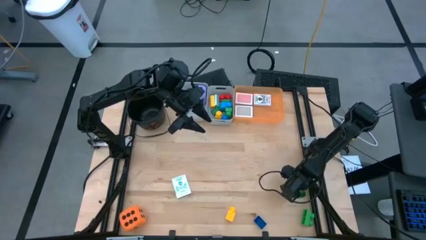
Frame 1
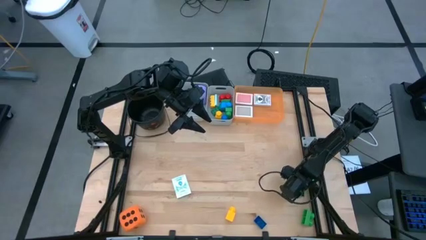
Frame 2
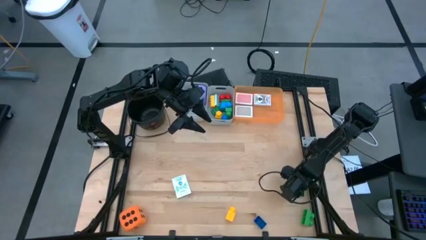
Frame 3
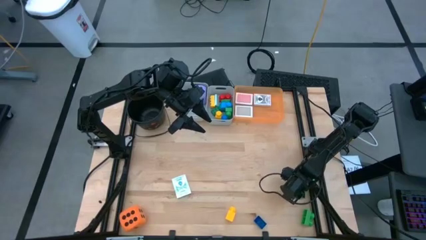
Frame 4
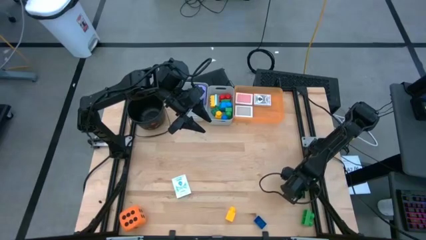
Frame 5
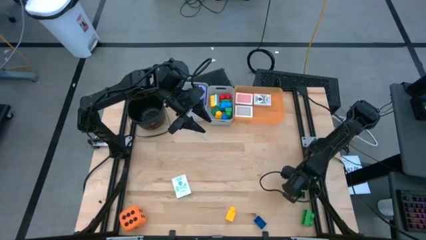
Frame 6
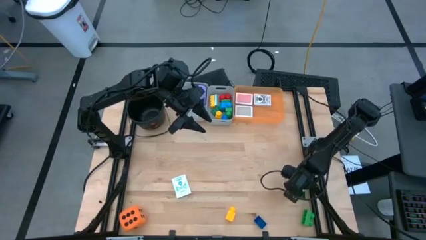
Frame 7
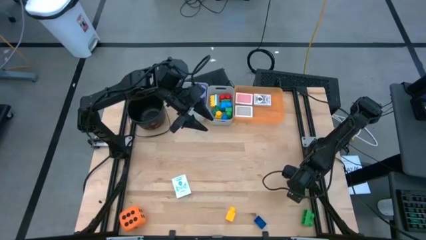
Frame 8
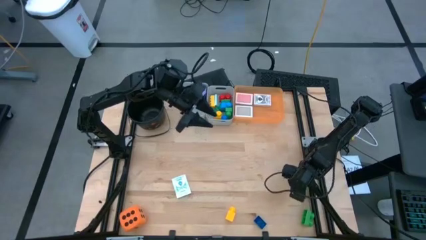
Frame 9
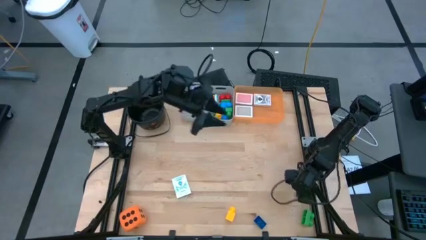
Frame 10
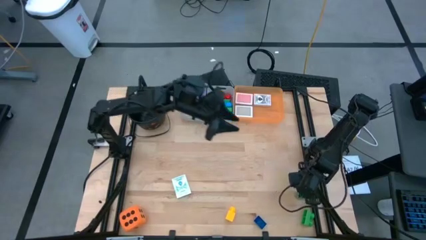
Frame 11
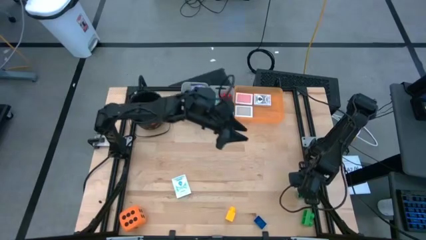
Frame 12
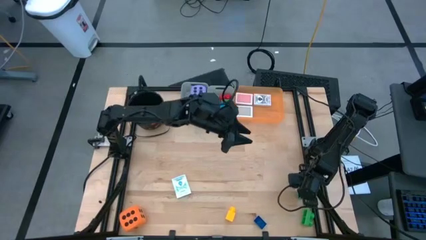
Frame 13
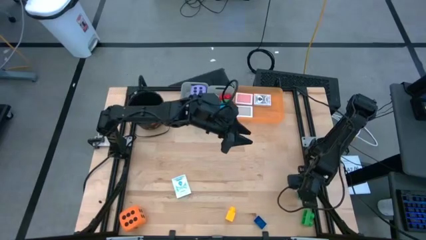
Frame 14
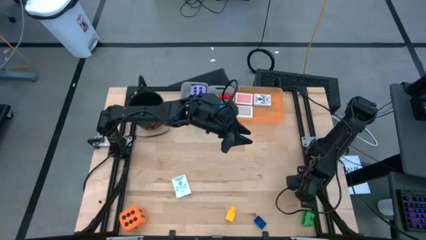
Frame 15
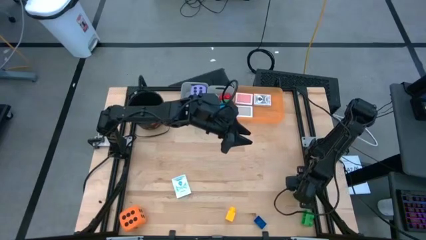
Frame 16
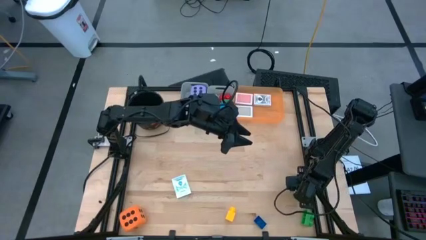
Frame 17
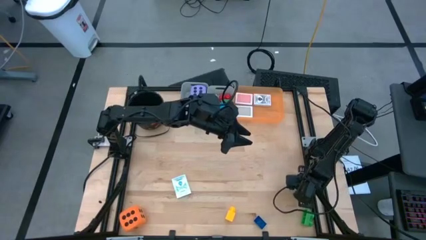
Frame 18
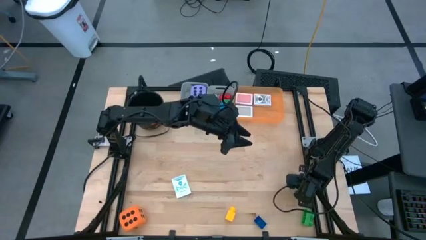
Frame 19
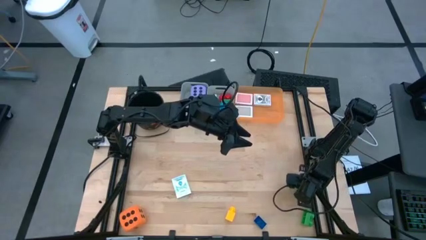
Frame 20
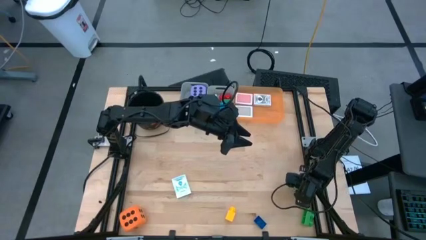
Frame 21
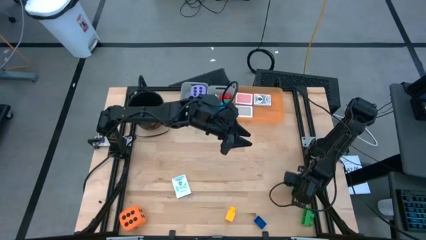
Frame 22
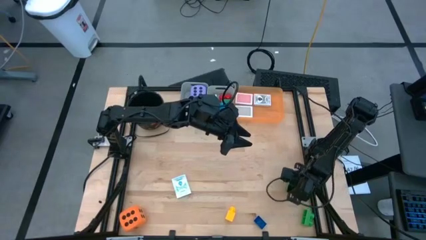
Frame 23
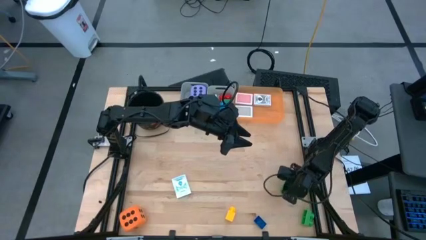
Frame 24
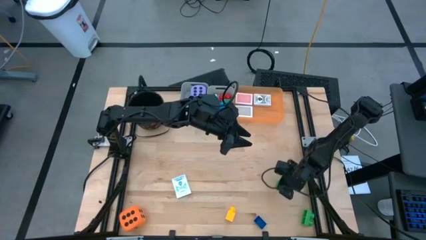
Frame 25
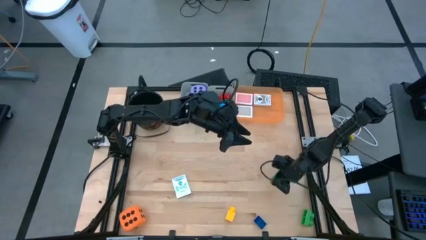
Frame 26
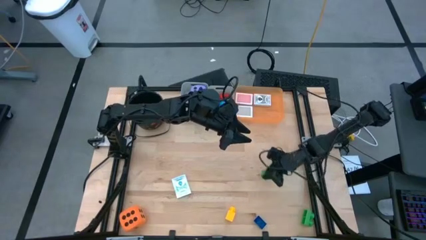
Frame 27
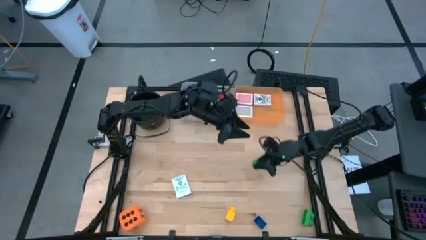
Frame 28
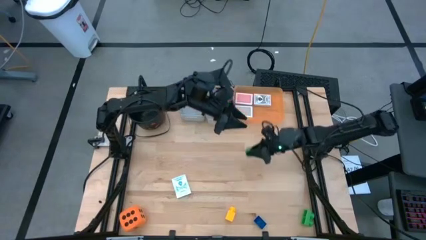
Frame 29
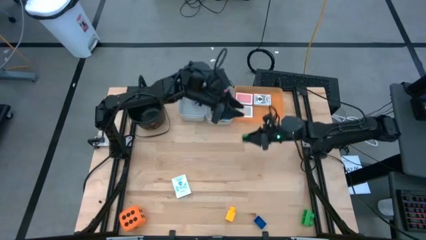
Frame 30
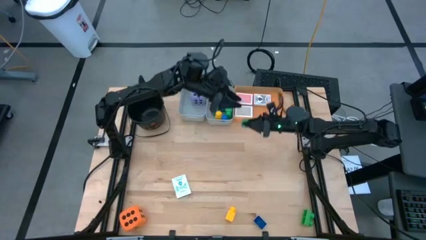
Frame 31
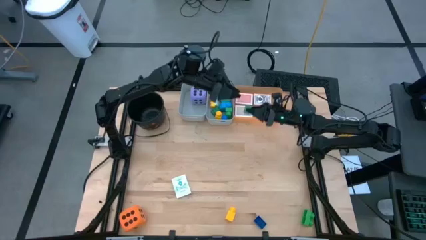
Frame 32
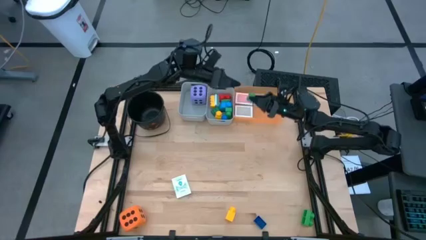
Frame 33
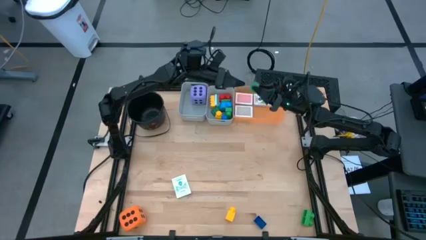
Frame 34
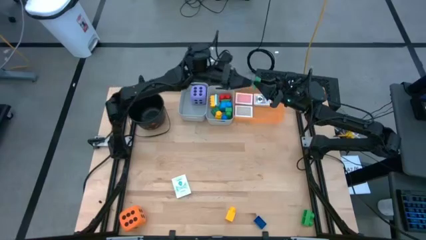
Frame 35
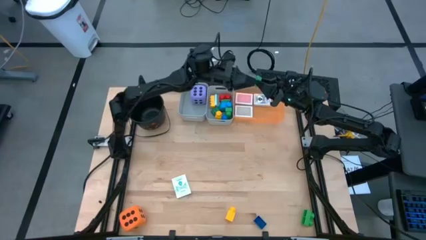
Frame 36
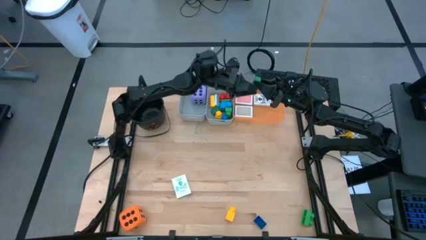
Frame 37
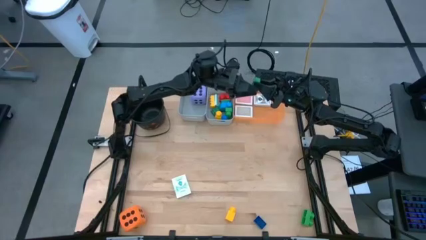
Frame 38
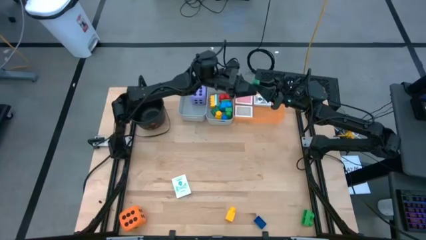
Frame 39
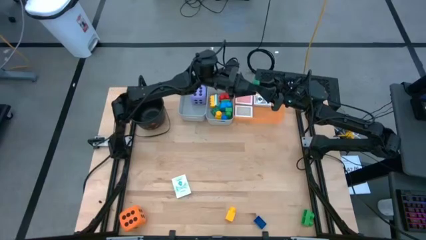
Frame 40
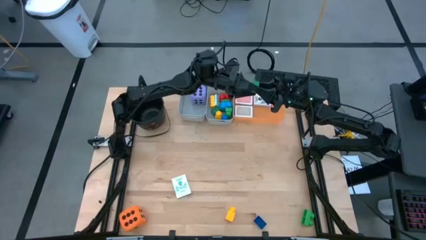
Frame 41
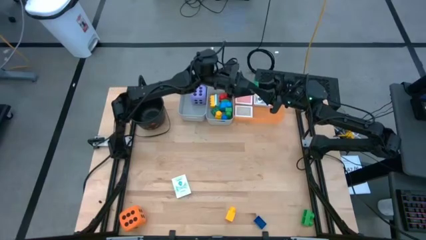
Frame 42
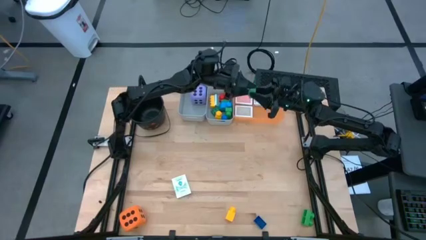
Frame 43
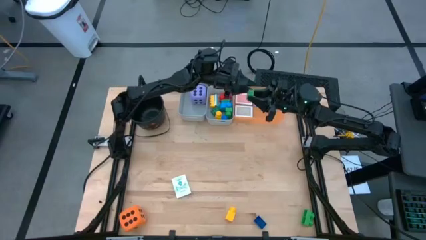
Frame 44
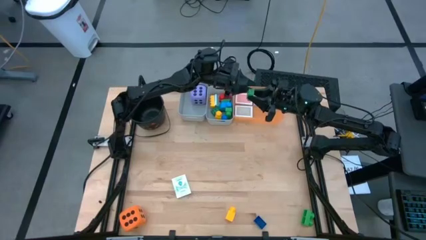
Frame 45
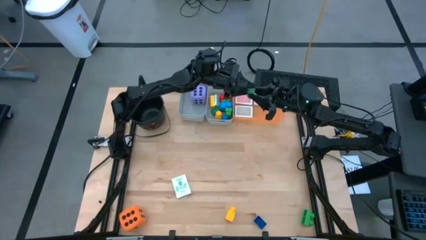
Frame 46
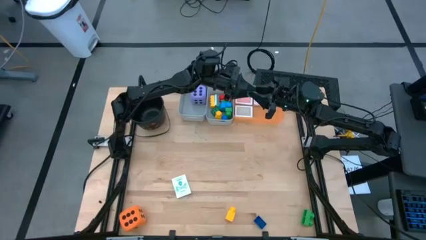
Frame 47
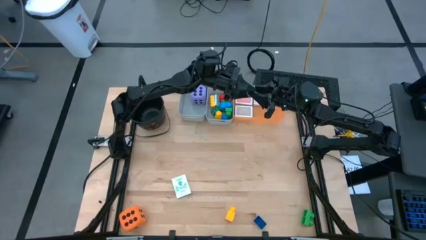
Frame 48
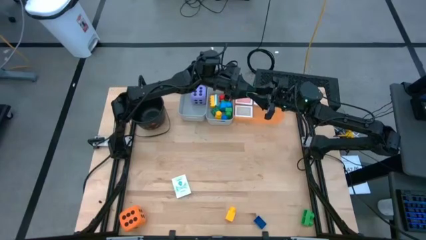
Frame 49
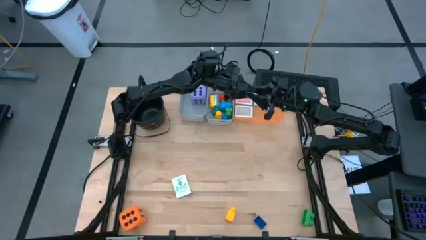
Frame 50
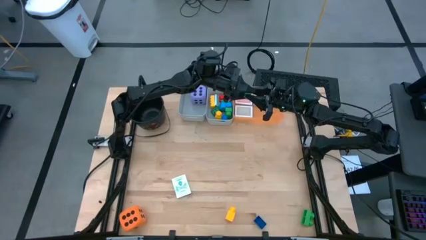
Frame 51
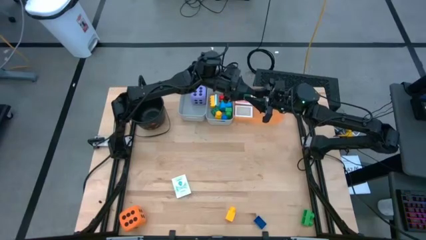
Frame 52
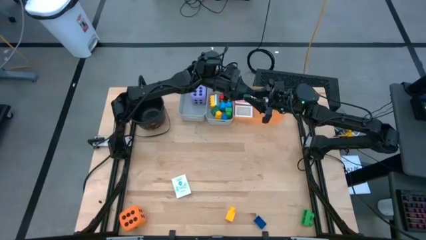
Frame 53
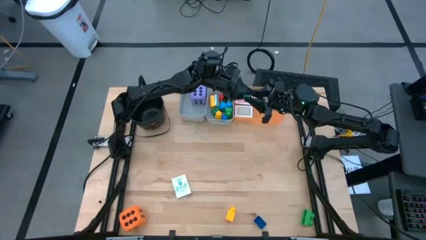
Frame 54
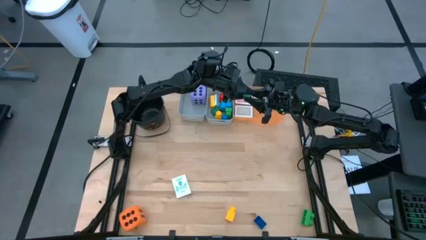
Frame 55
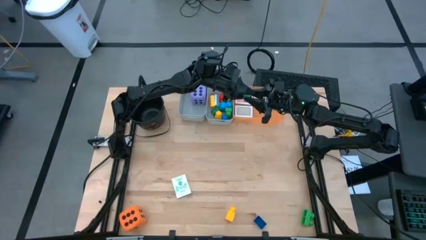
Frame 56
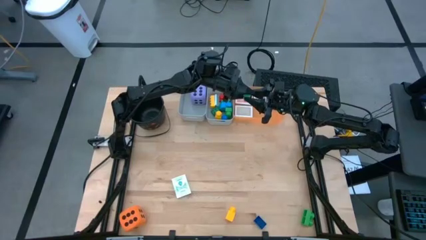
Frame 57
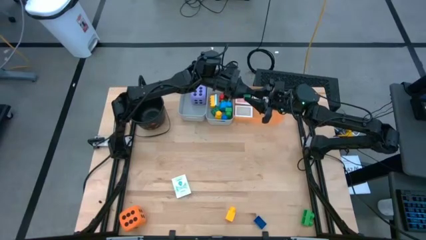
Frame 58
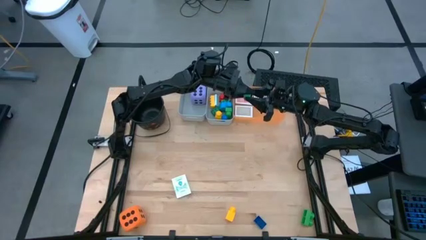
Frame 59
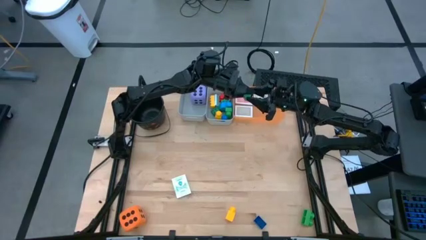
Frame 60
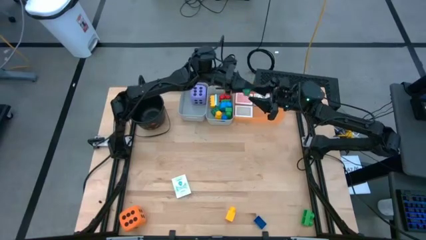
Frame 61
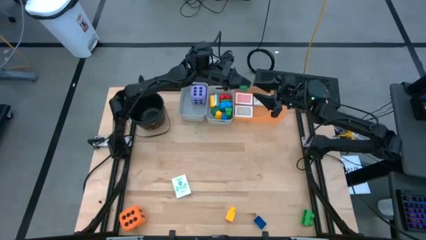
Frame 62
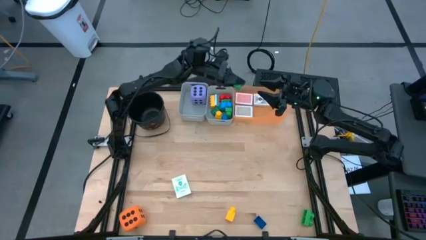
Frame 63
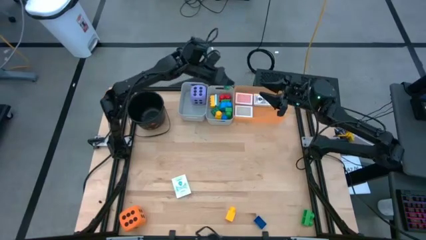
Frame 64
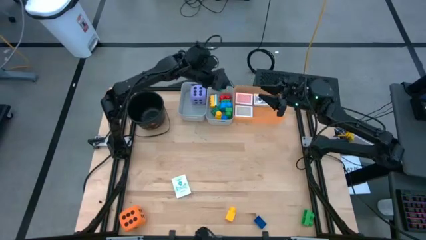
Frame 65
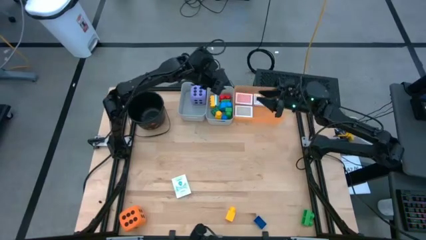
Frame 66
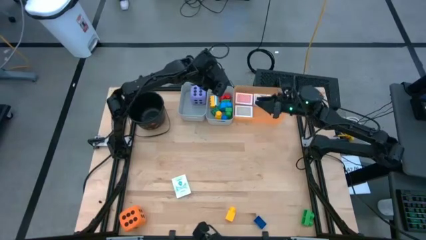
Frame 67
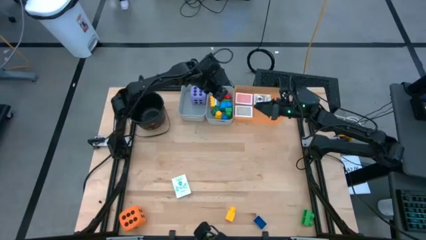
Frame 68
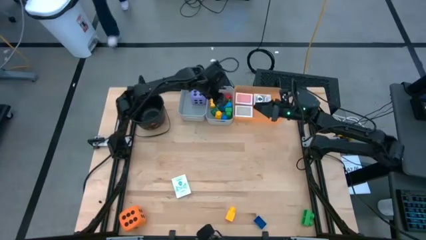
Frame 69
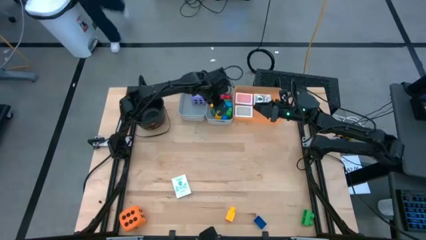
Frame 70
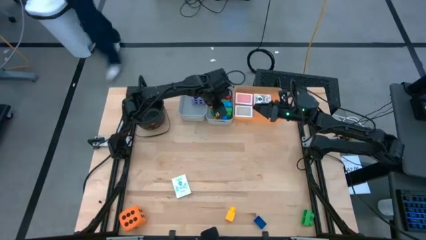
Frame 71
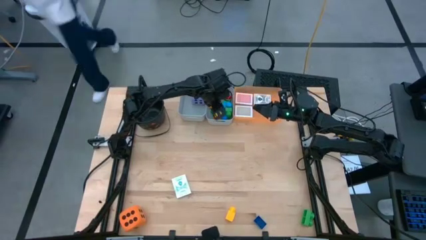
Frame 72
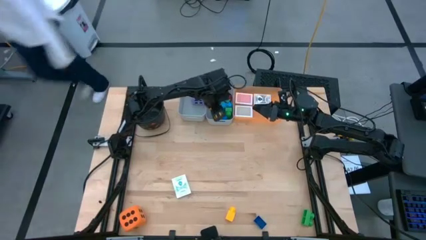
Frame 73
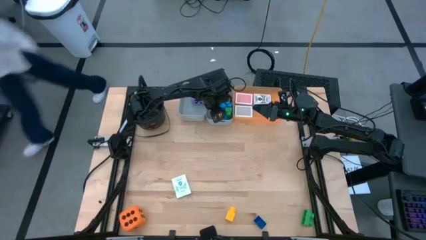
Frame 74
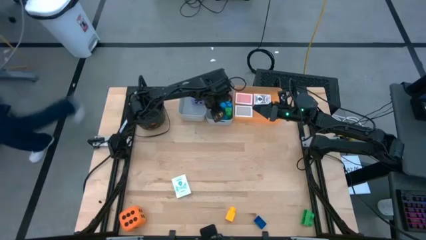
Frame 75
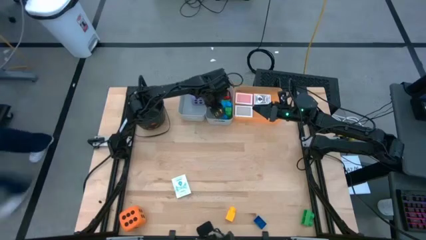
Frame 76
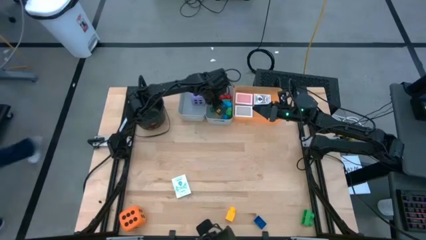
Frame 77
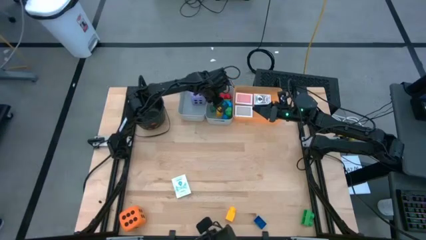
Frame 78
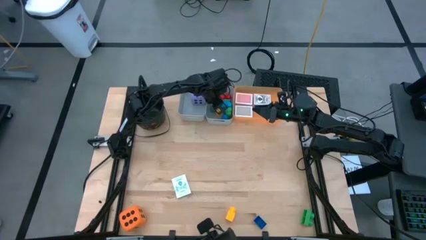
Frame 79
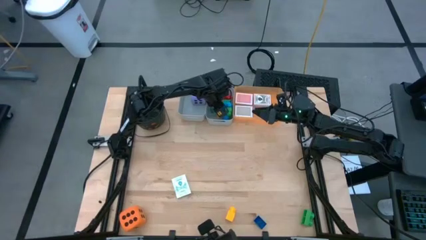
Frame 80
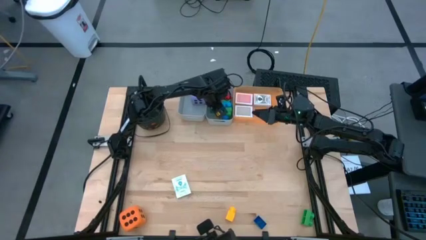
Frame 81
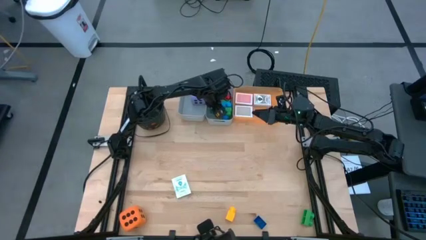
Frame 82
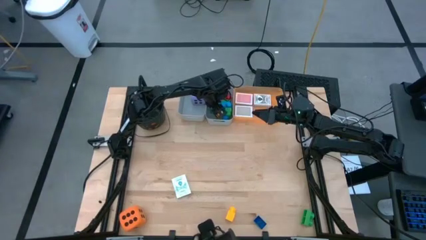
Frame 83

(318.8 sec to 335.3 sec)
Task: Pick & Place Toys
Put the green gamepiece into the right gray bin
